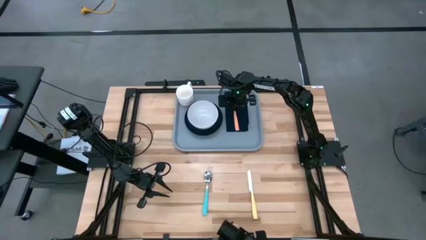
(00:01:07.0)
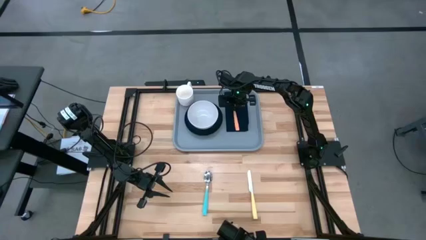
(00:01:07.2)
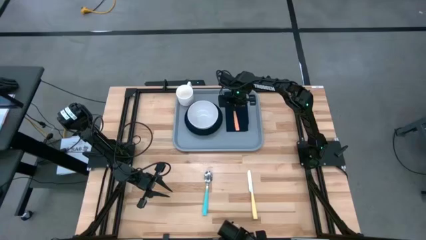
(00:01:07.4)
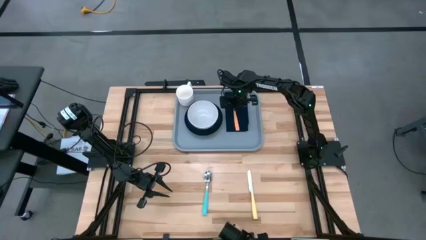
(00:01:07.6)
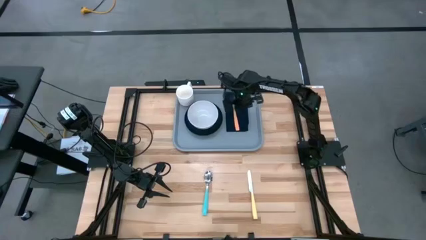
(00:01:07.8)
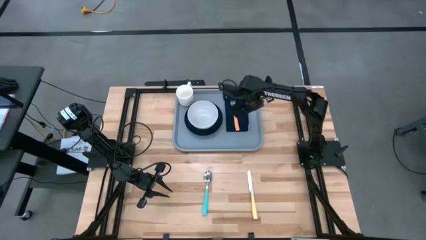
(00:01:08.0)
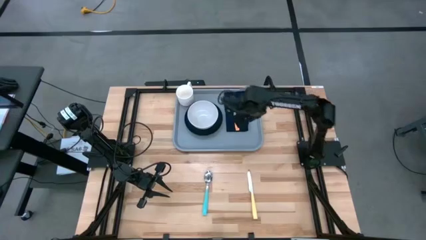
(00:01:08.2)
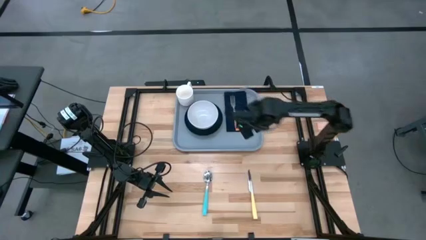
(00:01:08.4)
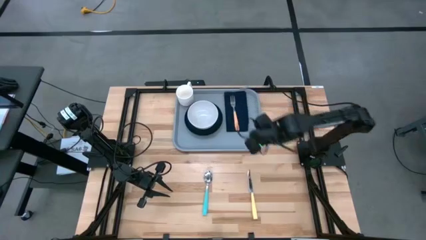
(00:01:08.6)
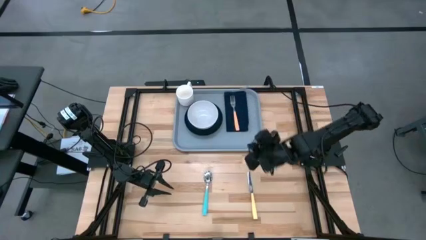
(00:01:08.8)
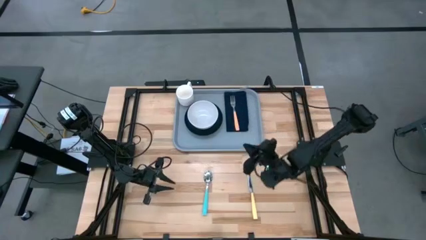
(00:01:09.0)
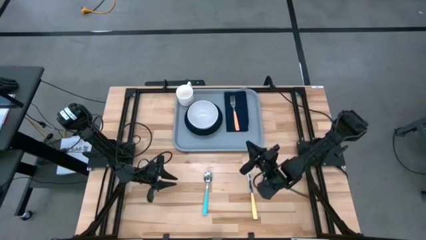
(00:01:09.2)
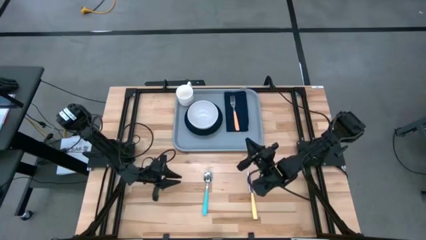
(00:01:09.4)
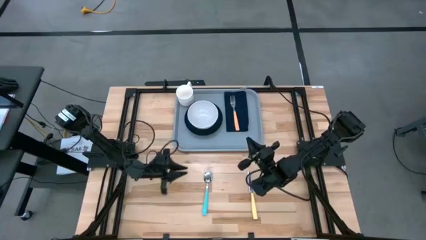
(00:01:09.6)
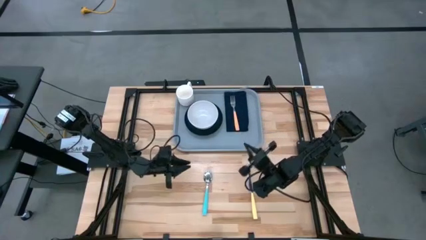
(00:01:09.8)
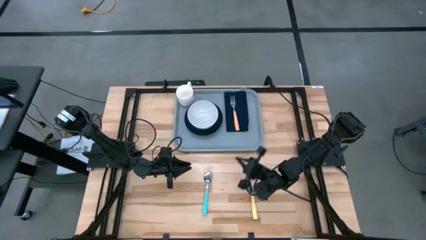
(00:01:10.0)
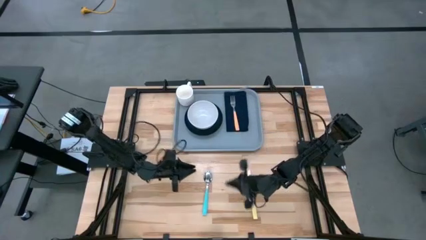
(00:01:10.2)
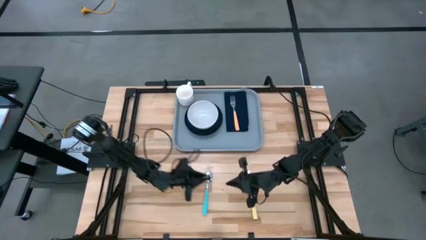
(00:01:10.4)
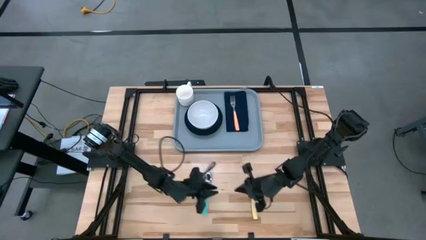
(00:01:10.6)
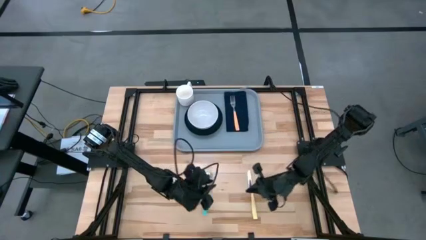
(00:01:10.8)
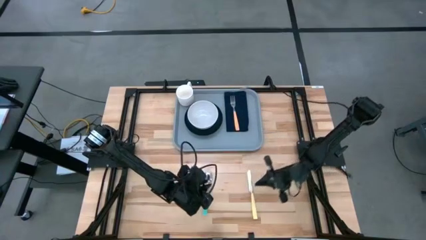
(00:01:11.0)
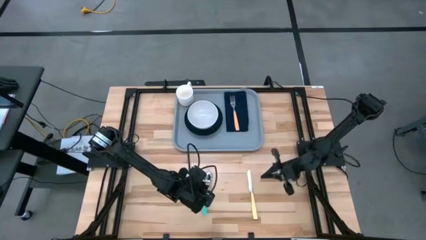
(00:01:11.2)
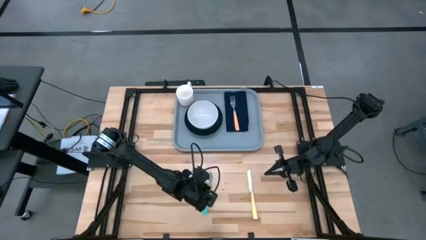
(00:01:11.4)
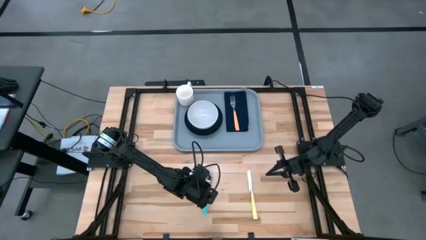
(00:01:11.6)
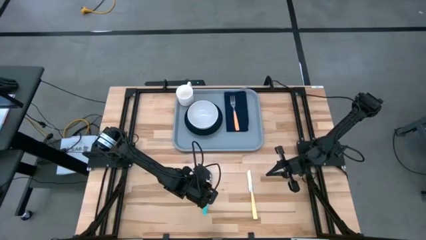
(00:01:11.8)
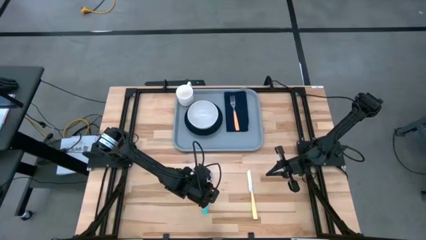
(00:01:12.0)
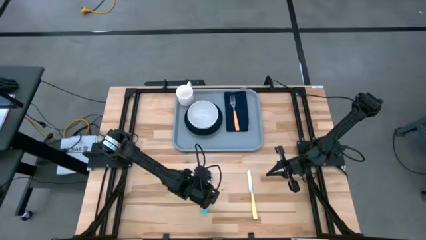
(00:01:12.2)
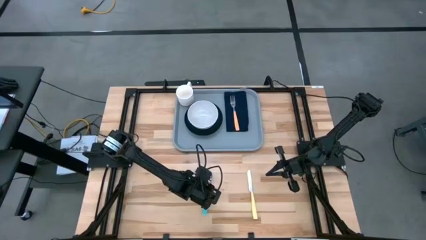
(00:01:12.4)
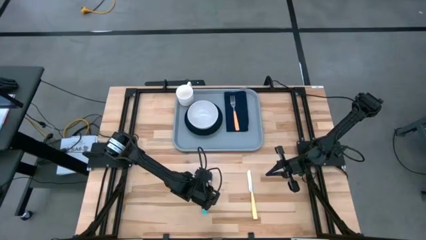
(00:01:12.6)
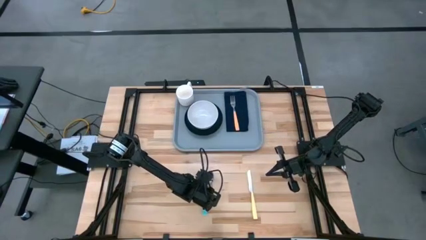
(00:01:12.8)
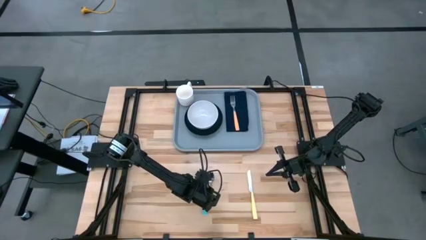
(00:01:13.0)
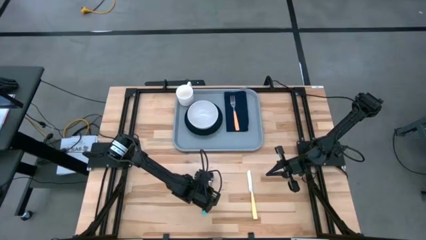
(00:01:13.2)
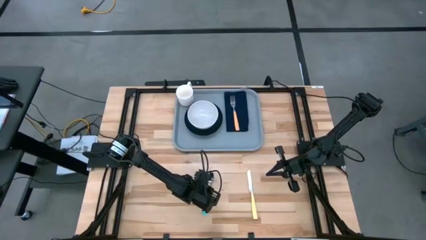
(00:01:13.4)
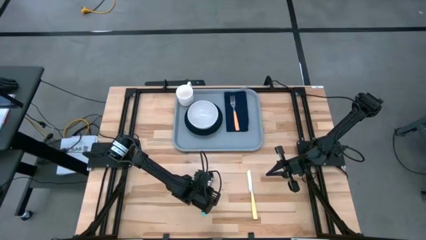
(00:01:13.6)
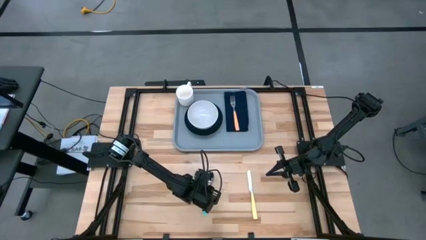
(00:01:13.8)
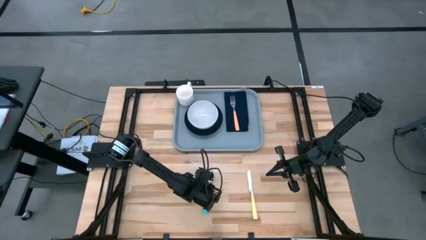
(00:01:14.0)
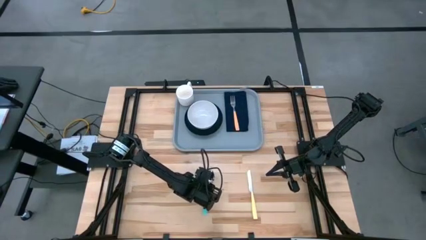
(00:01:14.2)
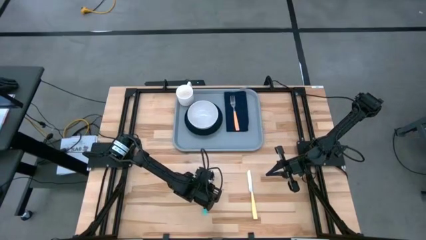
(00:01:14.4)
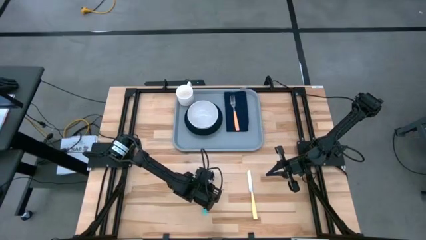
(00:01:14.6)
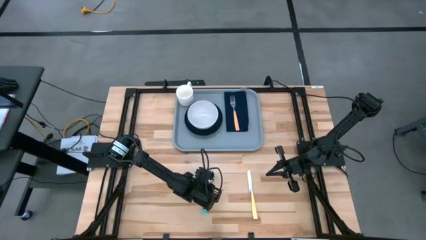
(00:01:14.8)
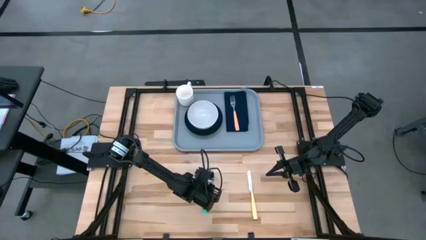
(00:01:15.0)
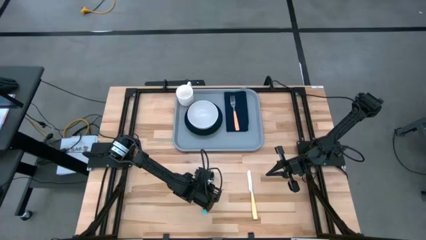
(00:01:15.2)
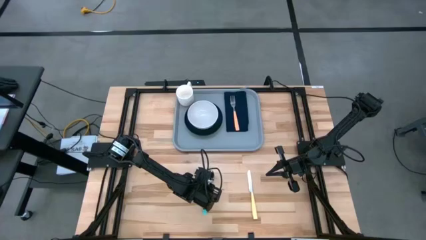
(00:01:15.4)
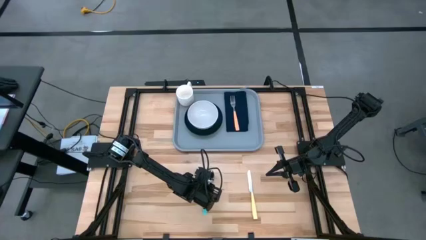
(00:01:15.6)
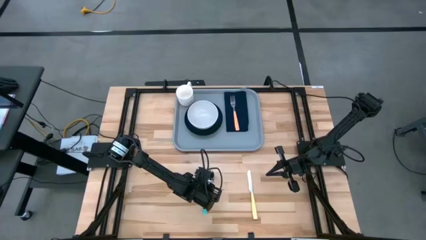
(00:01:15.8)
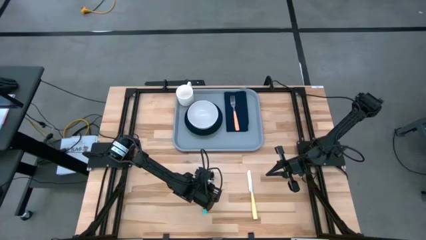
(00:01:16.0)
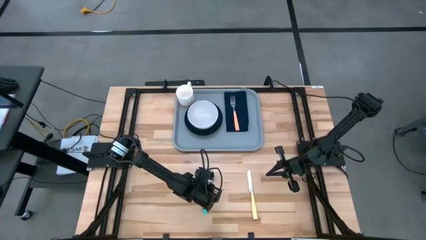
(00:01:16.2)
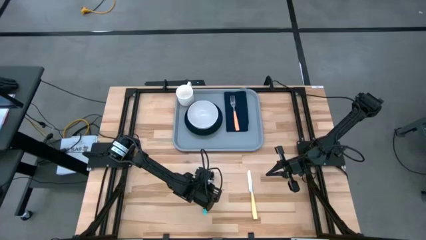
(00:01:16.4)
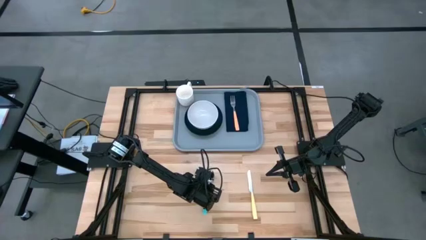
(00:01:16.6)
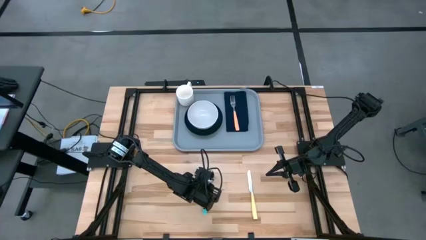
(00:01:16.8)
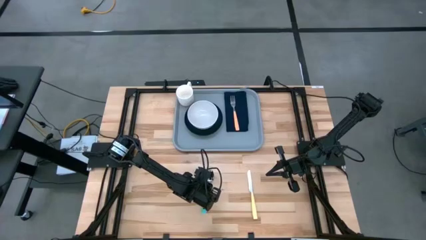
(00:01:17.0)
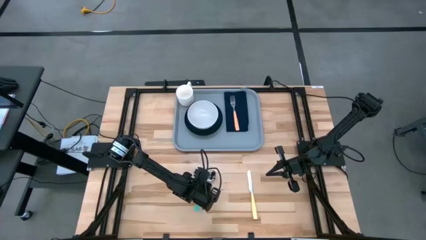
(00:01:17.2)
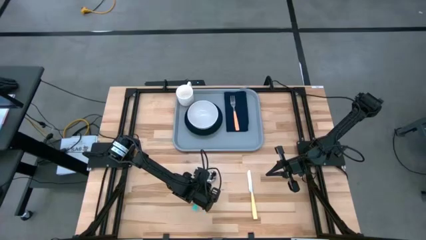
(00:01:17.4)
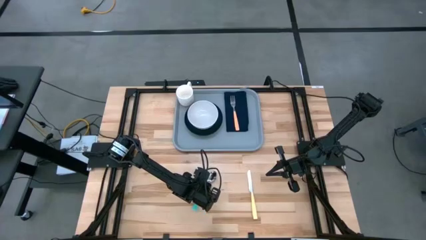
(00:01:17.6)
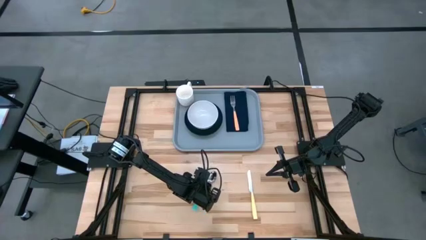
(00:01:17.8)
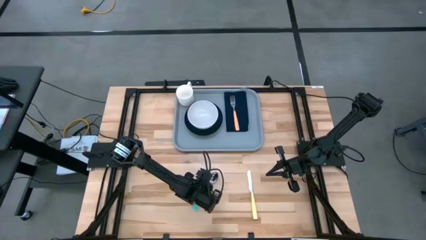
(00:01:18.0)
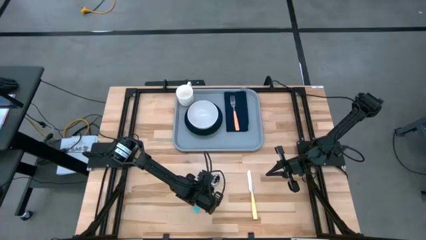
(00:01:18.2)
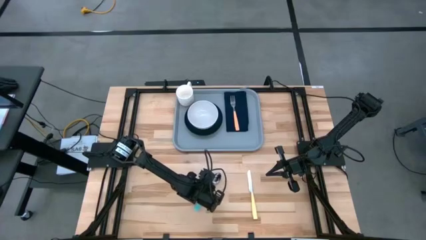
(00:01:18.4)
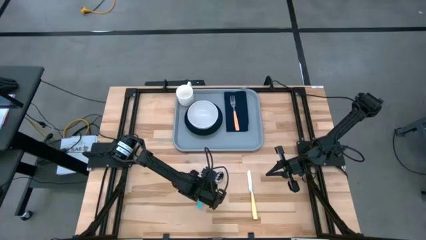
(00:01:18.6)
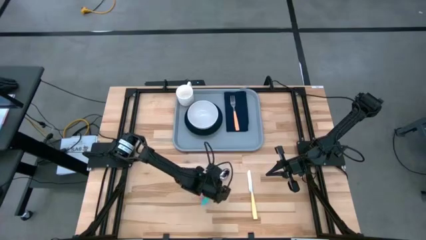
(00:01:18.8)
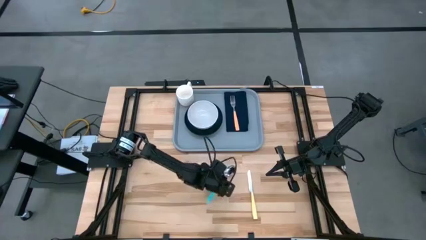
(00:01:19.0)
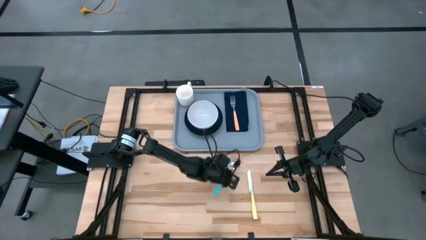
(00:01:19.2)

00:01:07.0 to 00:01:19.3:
Task: Set up tray
Put the blue spoon on the blue napkin to the right of the green plate
